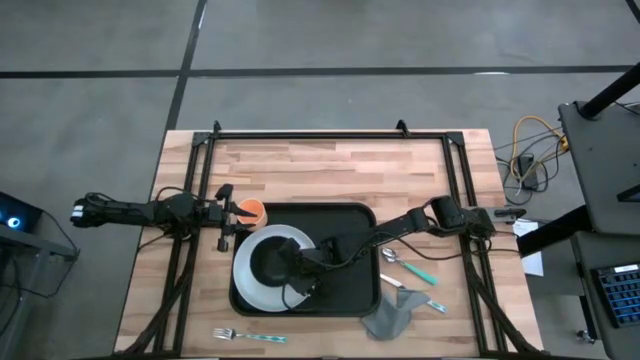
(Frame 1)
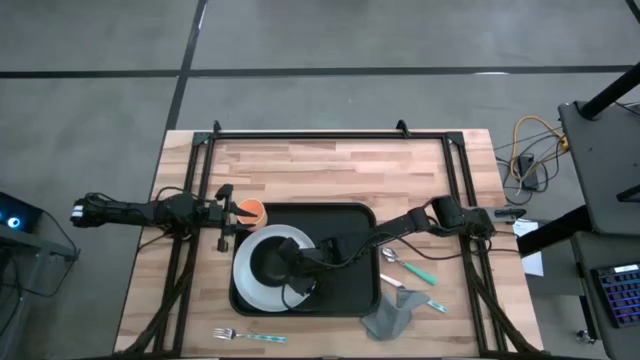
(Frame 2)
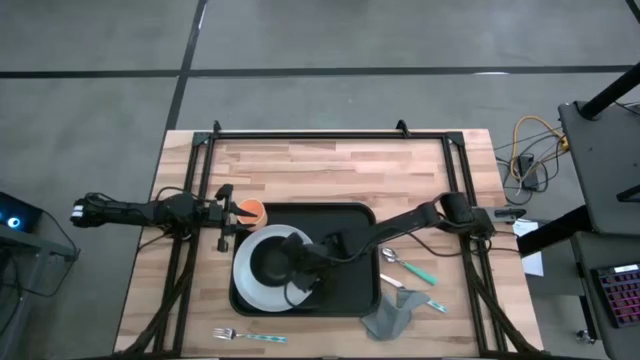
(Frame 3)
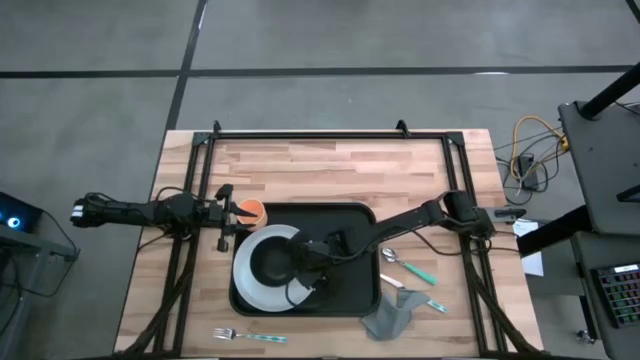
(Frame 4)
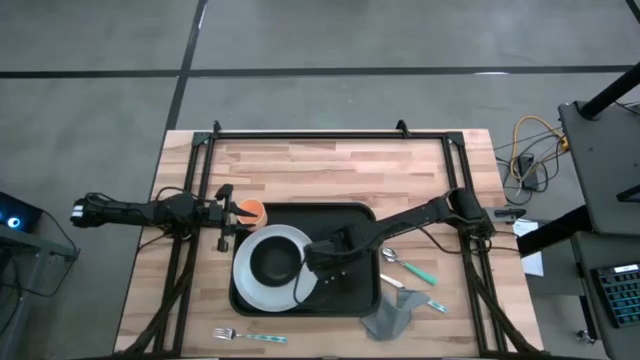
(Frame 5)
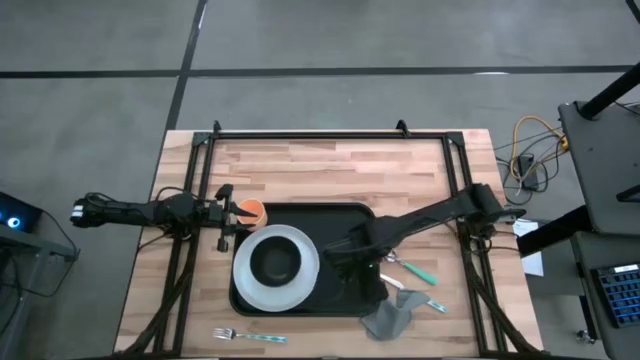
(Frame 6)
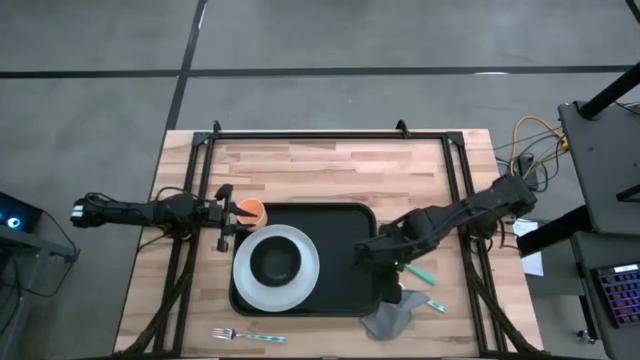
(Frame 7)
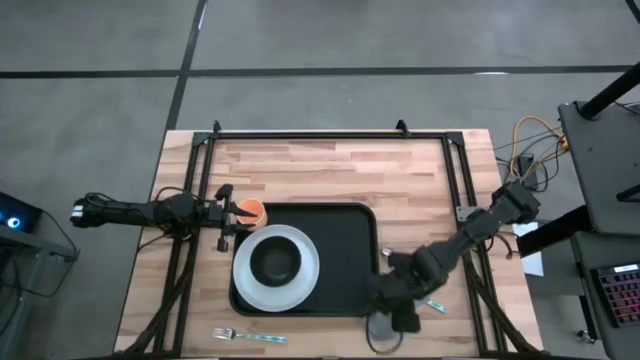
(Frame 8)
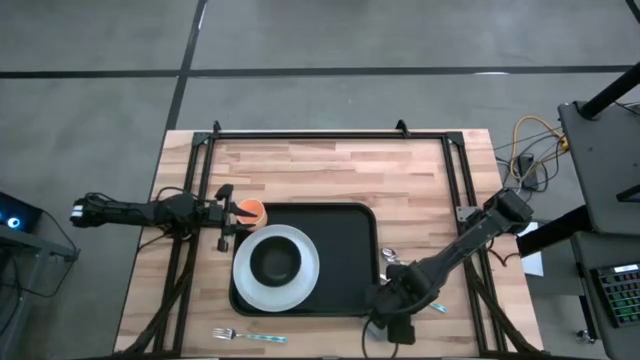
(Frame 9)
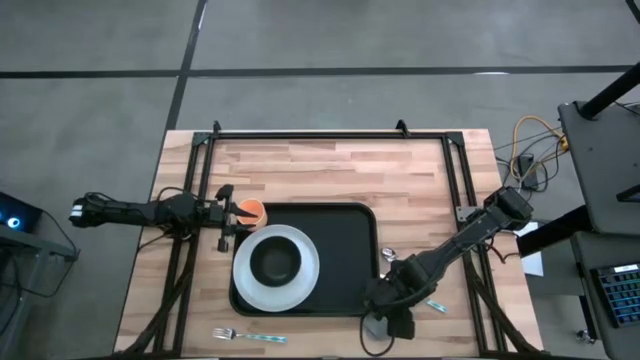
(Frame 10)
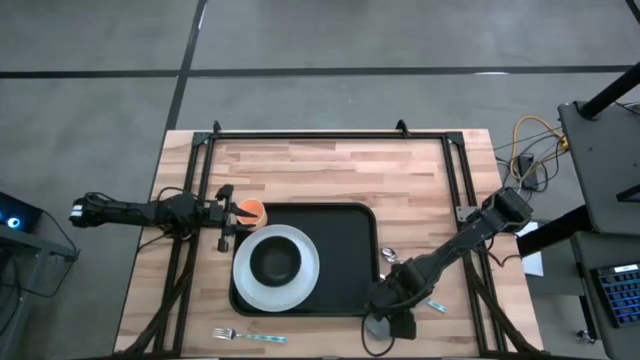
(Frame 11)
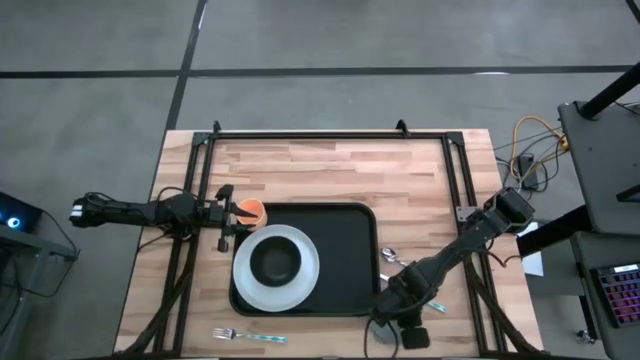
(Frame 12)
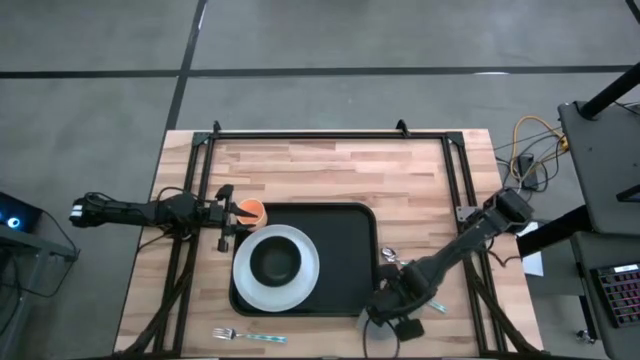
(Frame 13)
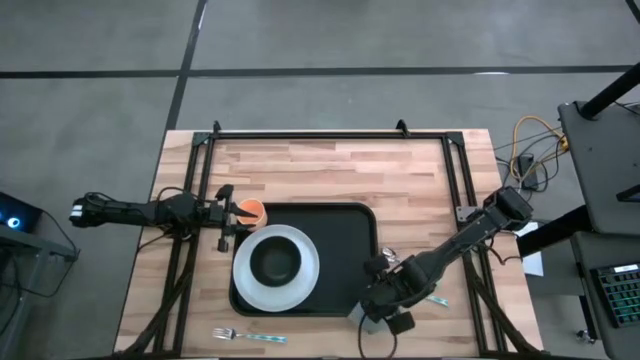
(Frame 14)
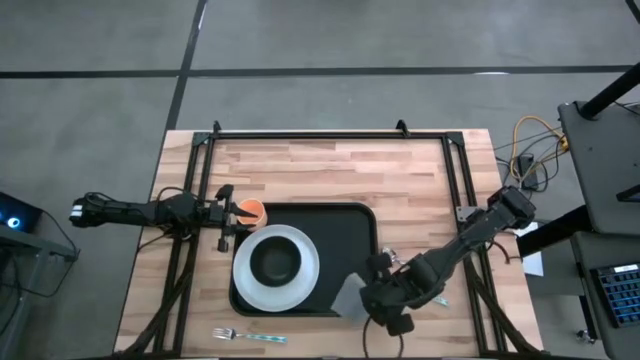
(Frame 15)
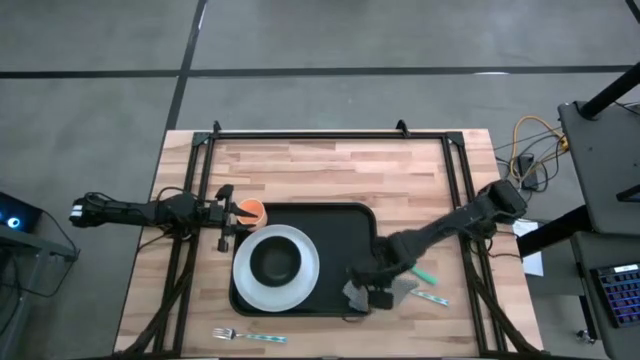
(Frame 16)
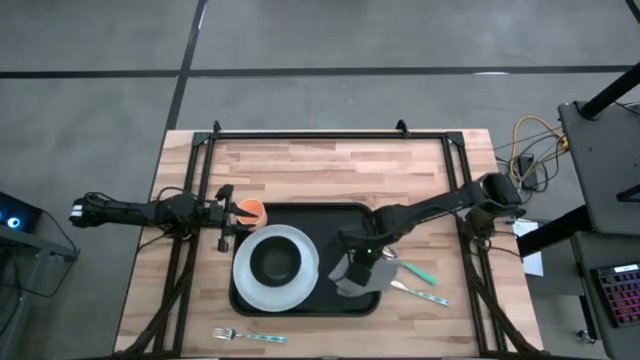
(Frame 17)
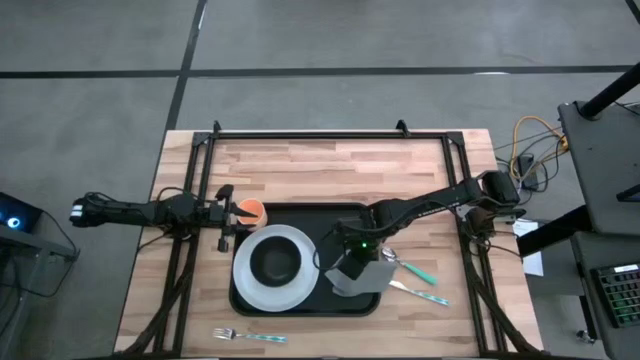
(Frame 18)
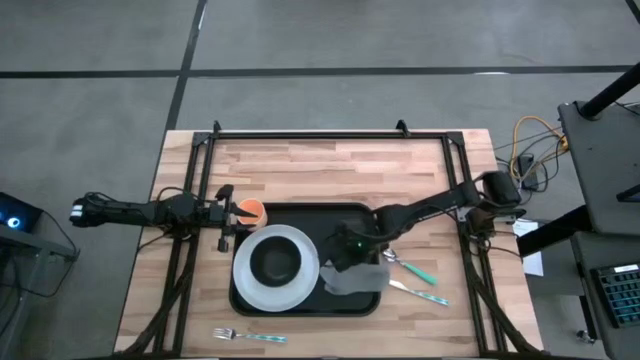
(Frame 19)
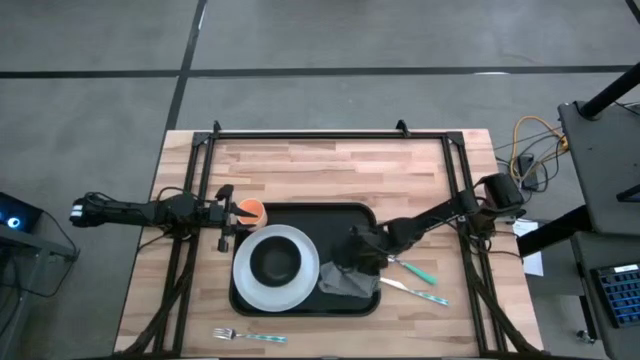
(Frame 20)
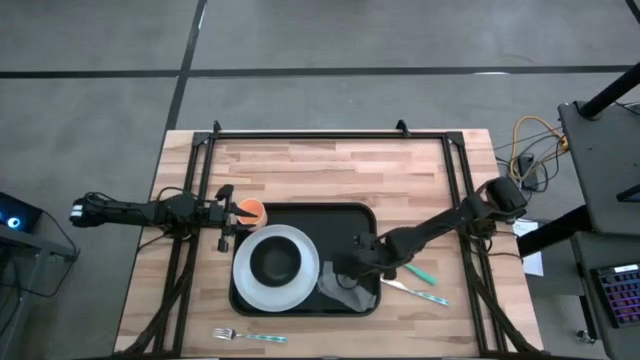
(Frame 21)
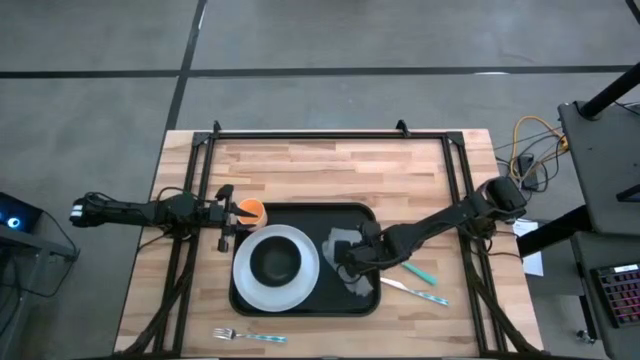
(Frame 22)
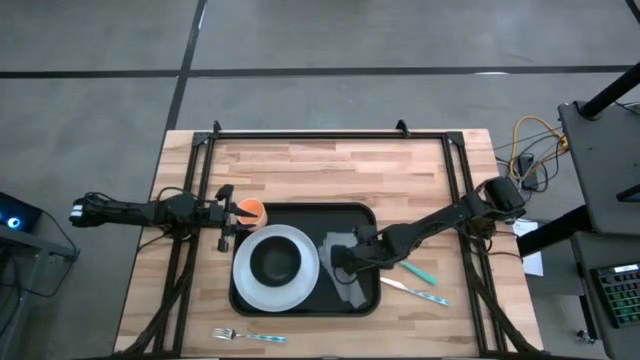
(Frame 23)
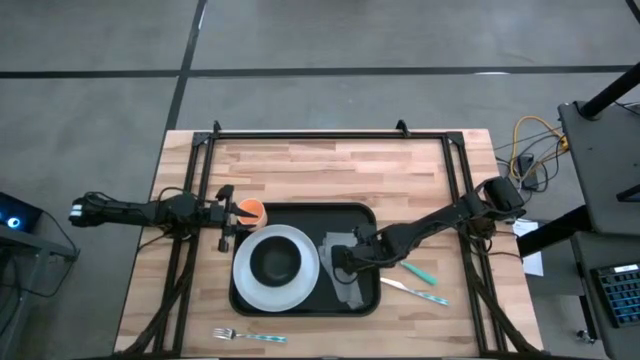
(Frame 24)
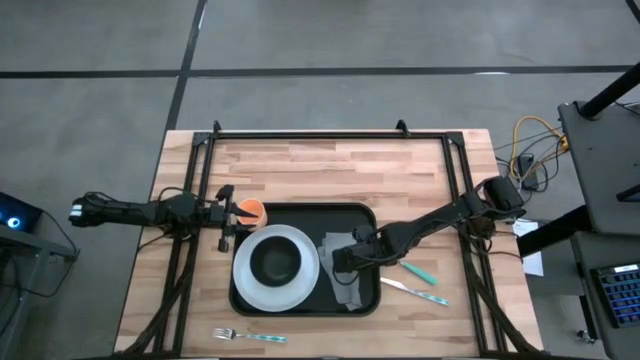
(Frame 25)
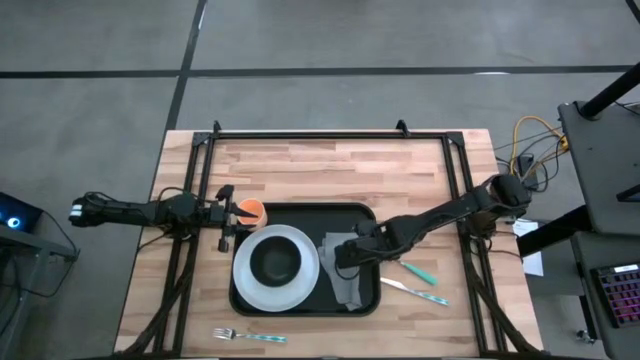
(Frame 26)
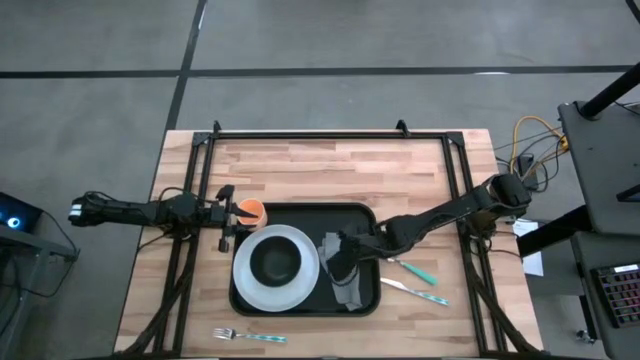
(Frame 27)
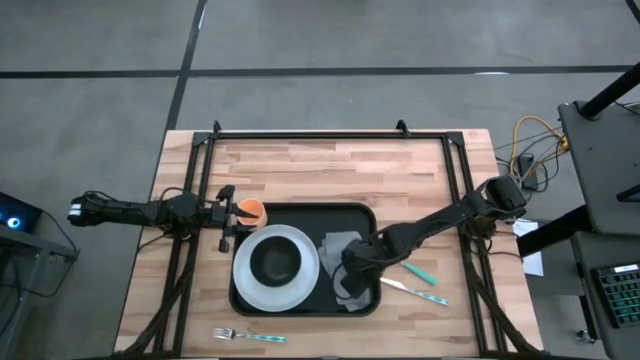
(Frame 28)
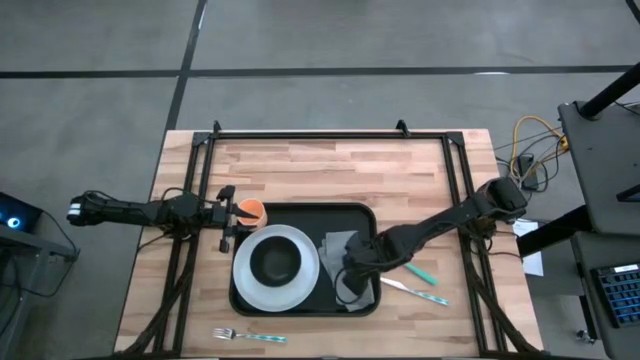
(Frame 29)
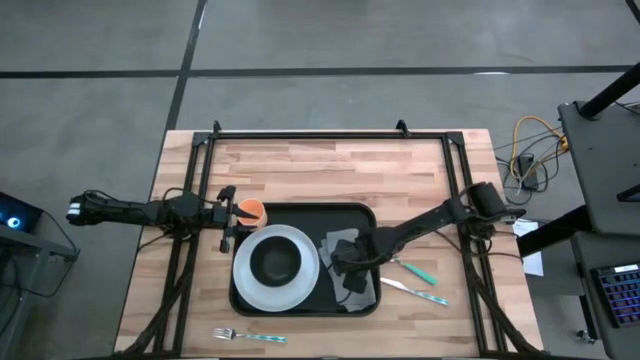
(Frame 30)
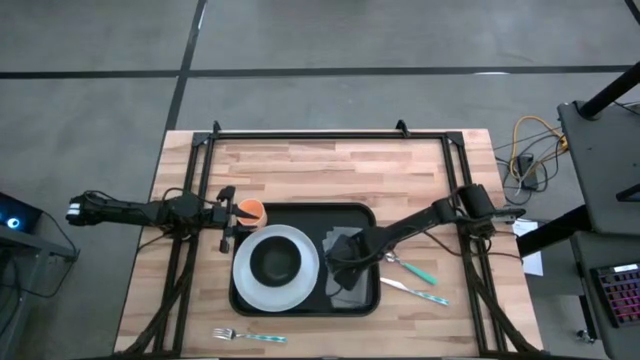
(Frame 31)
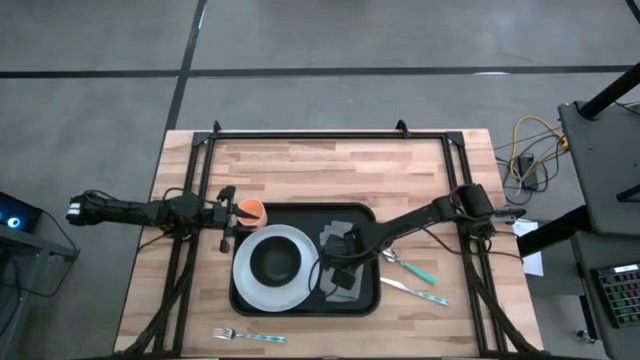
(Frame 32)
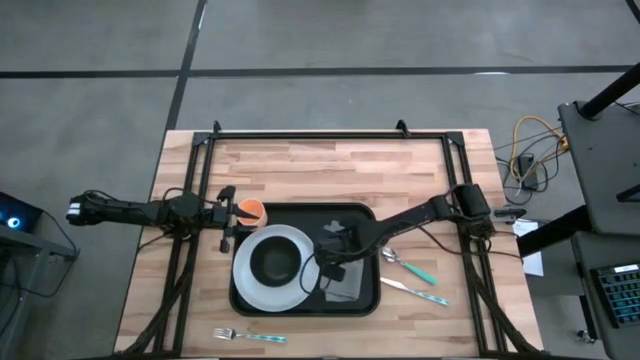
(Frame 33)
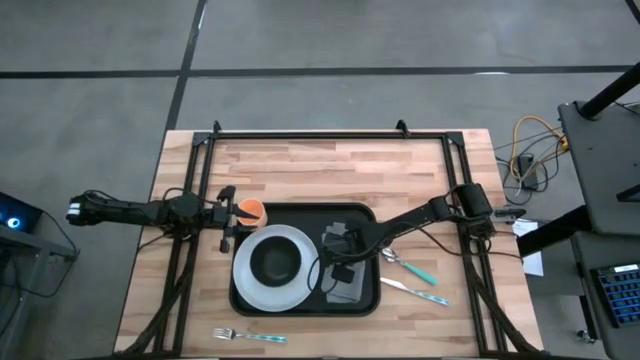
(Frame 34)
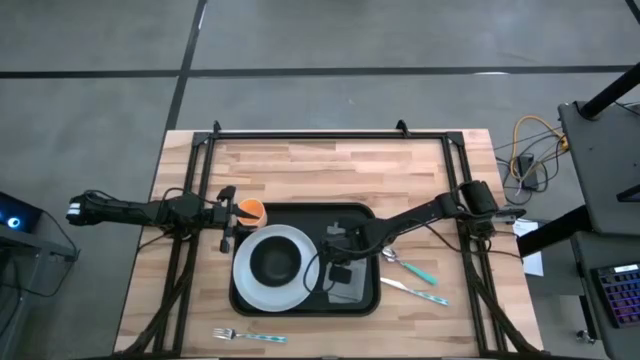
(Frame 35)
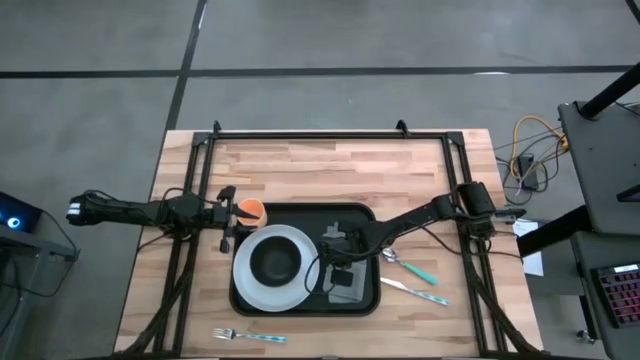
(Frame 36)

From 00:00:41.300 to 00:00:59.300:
Task: Set up tray
Put the table napkin on the tray

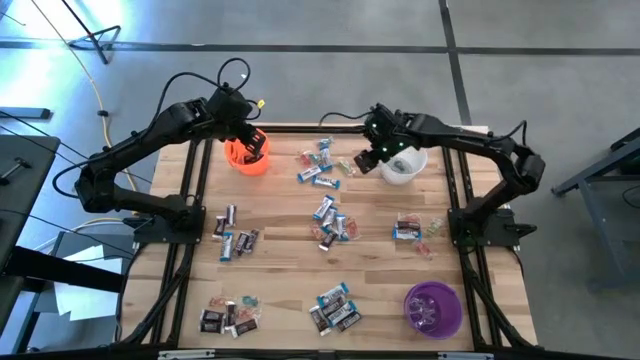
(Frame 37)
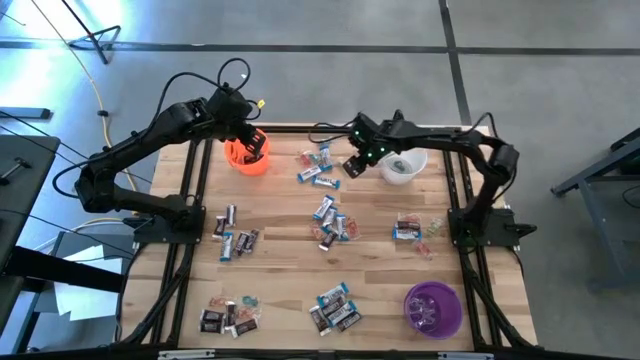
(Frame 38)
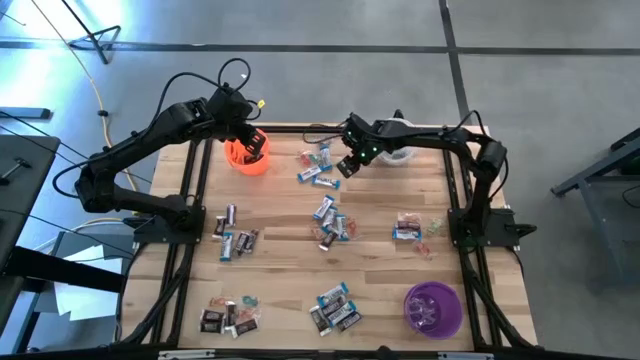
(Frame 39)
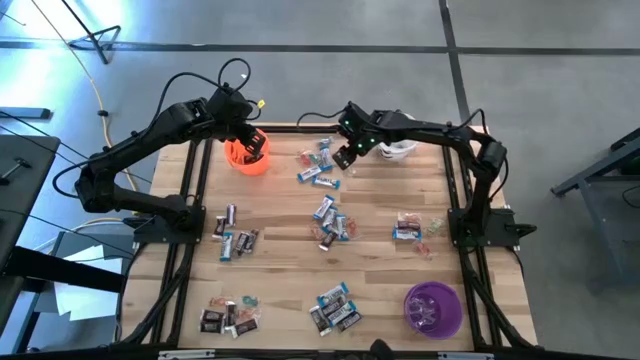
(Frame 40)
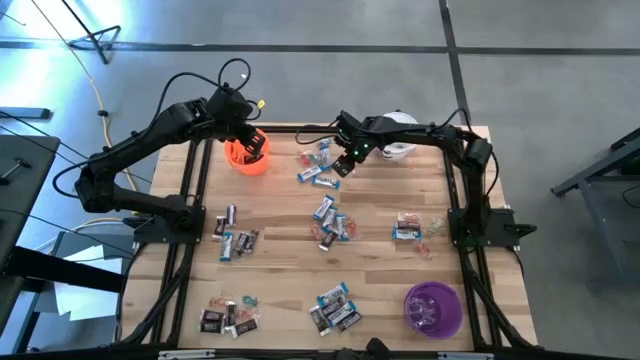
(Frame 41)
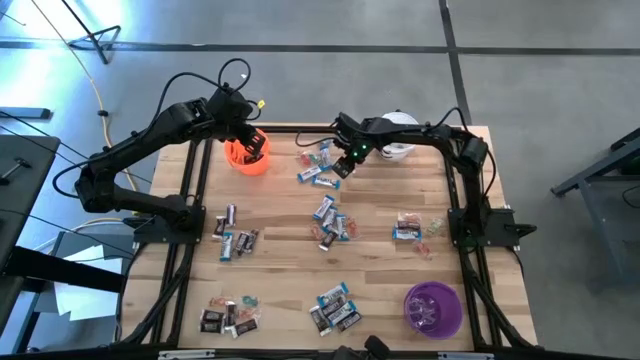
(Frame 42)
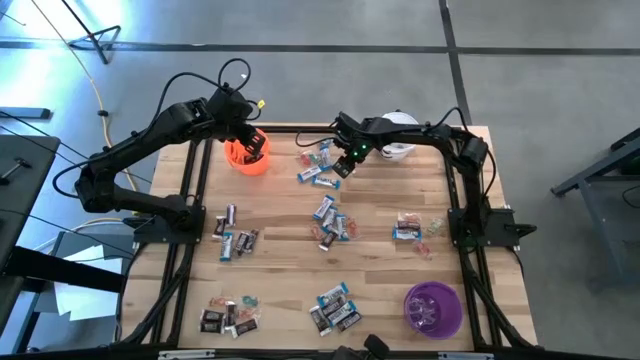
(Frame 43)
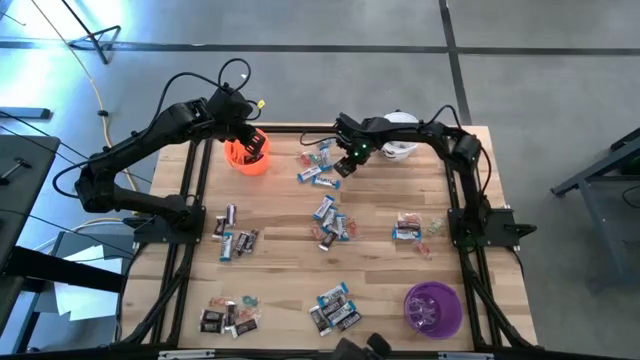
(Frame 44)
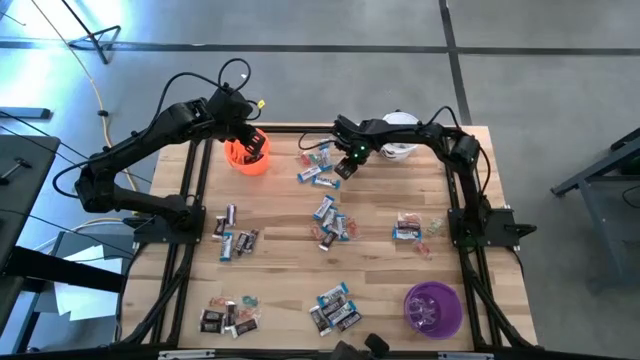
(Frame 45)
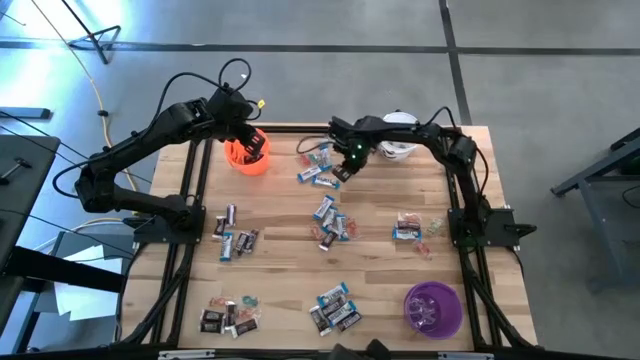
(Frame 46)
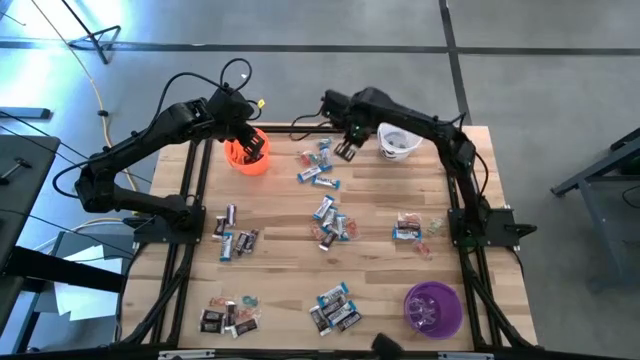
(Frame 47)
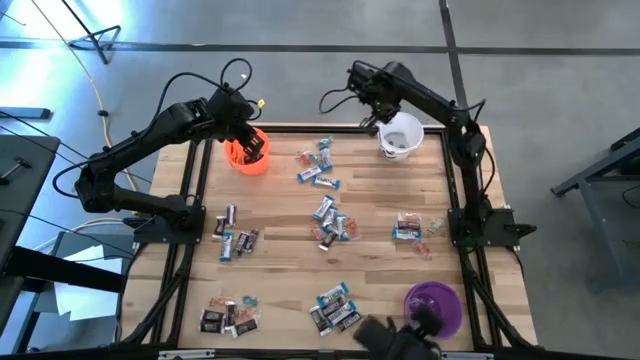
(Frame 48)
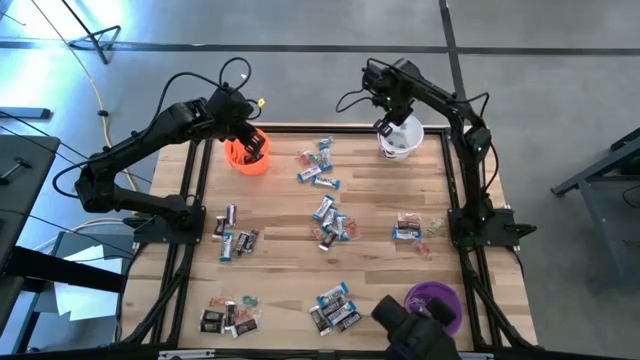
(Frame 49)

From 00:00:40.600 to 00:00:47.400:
Task: Sort candy
Put the green gummy into the white bucket
